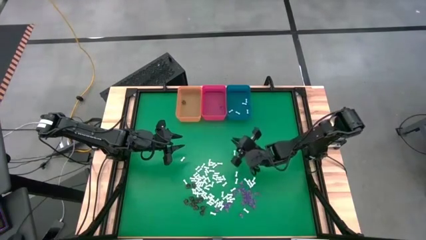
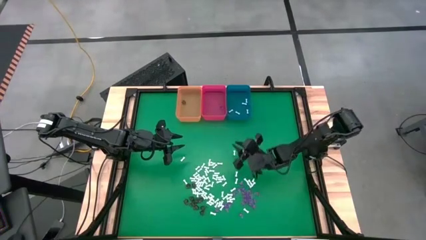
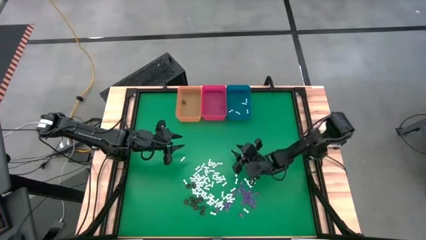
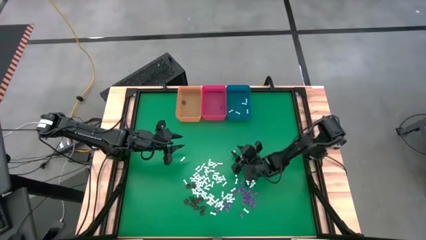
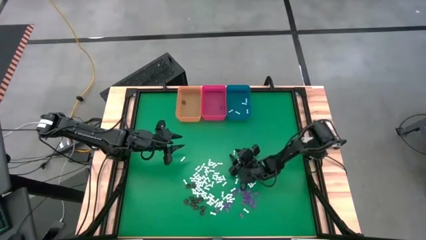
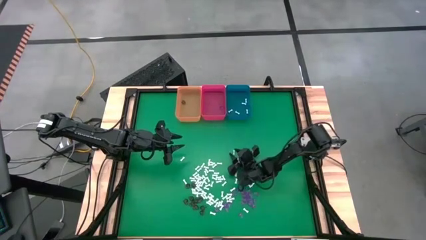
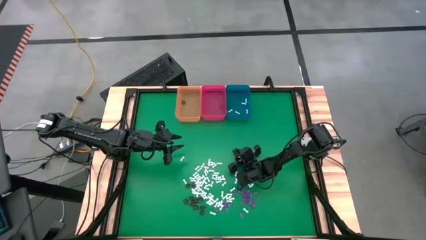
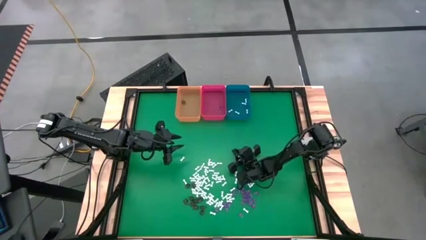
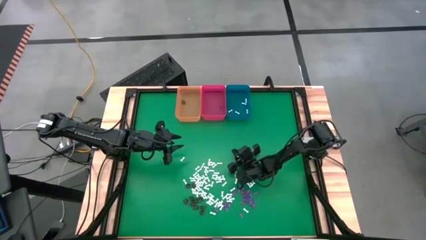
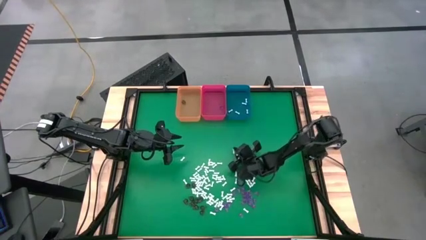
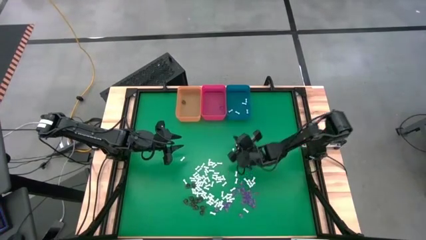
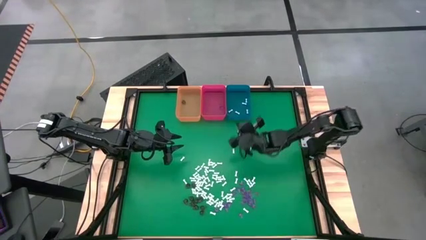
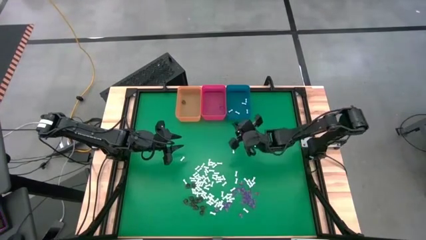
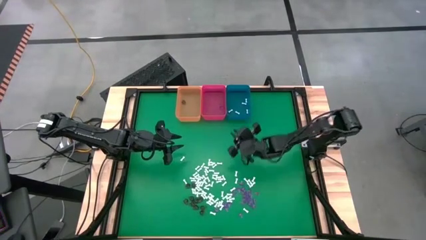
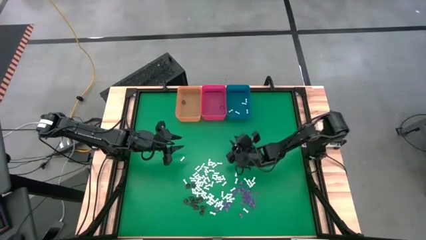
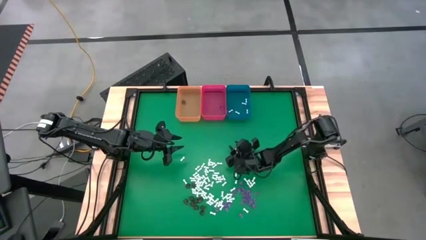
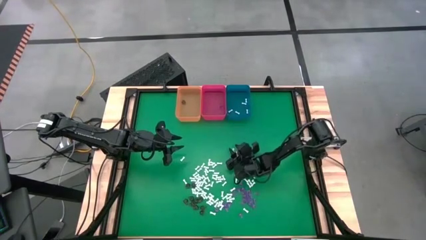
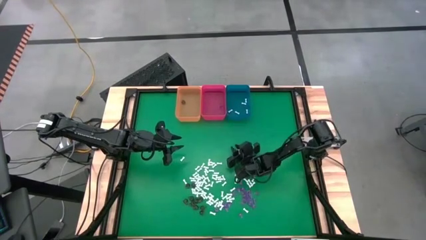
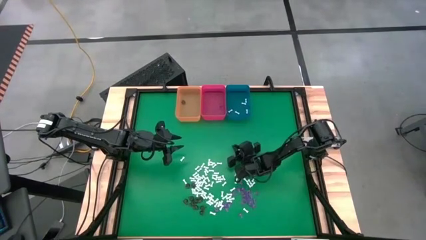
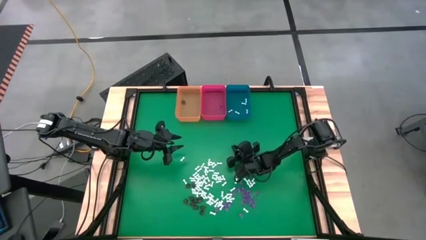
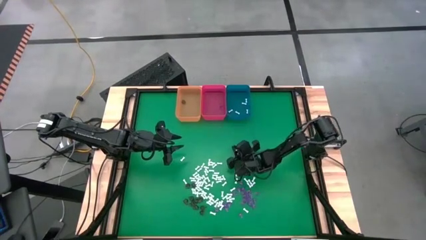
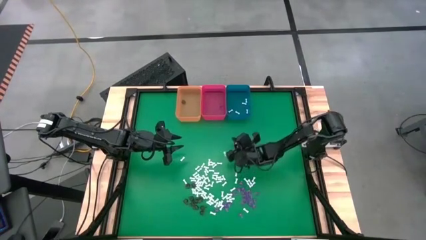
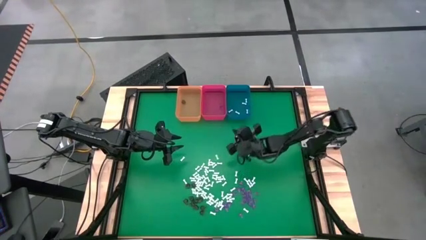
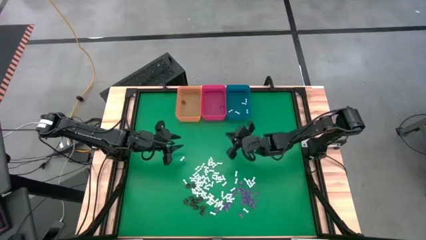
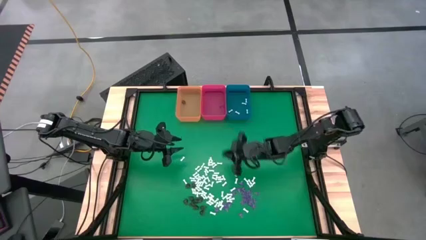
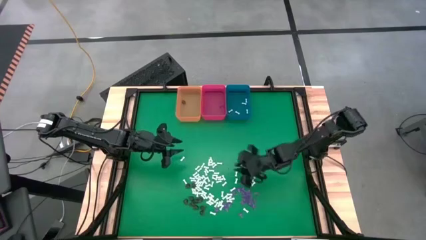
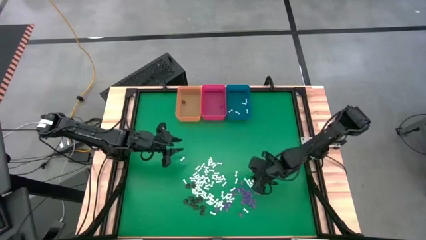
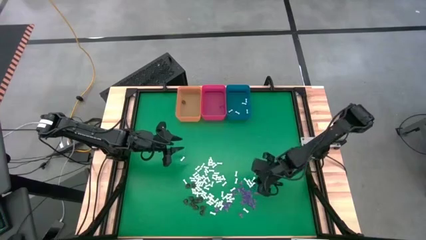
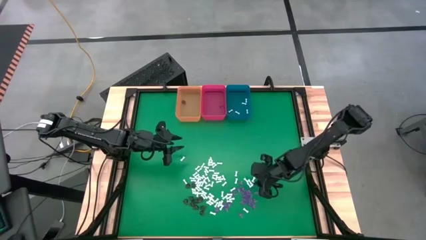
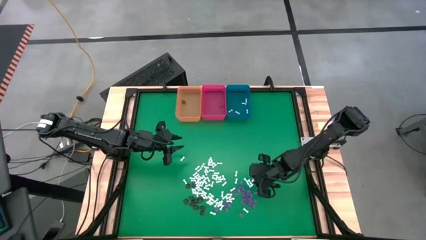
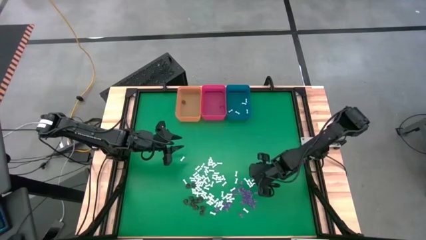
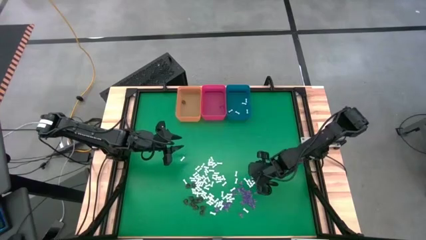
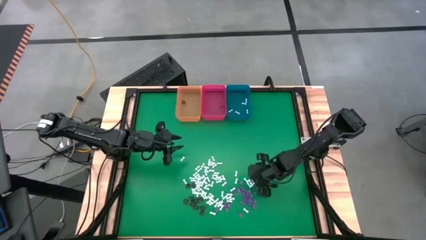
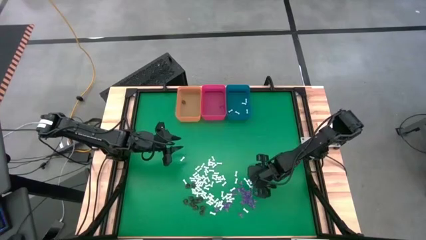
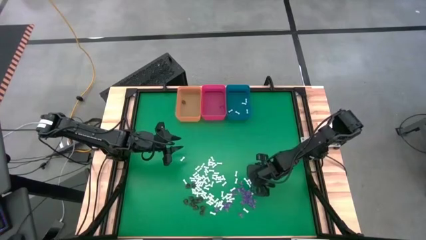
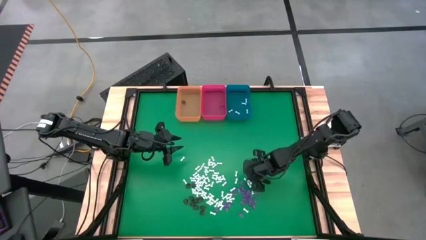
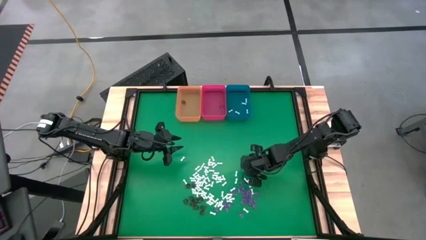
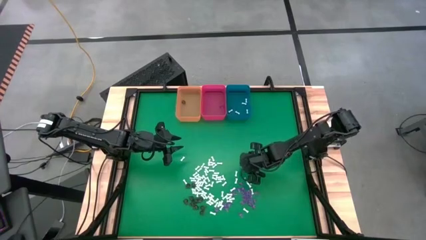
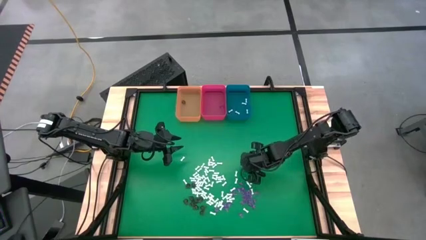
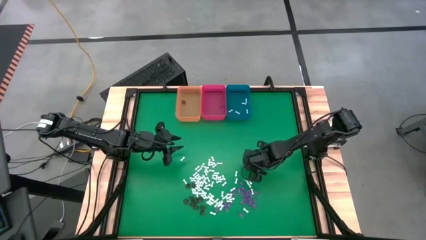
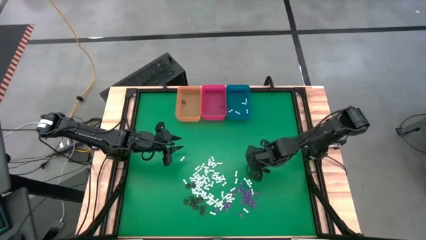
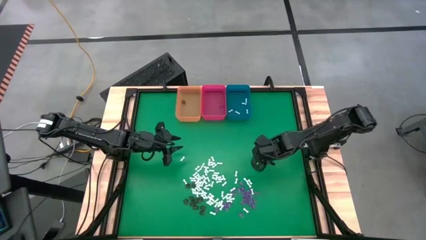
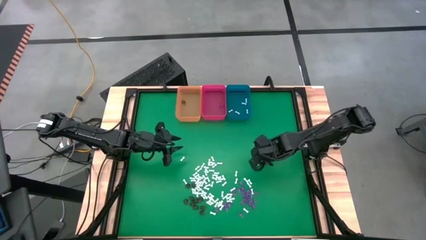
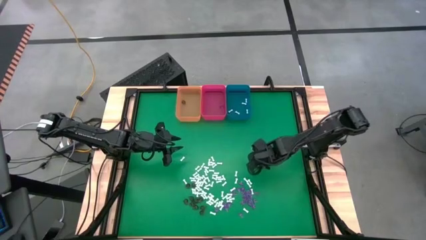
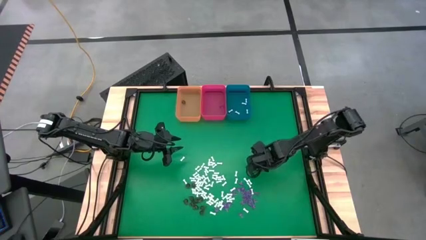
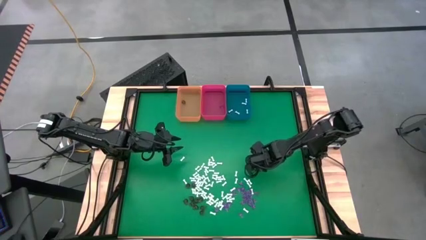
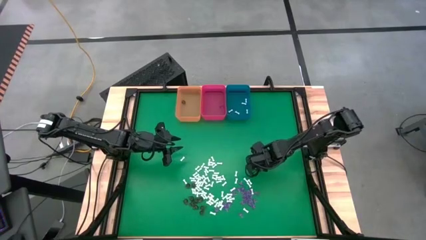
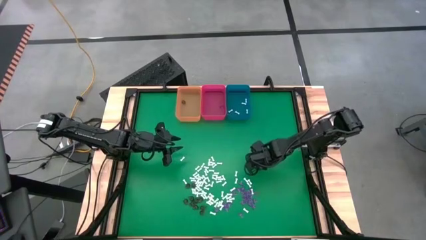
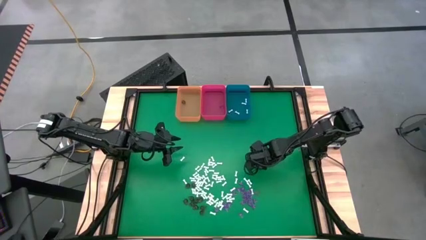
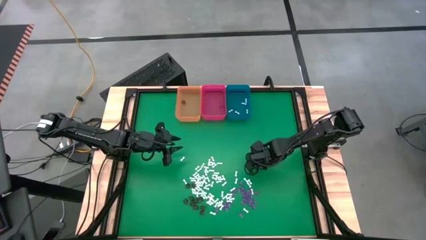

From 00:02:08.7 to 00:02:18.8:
Task: Sort Halloween decoration
Put the white bone toy into the blue bin

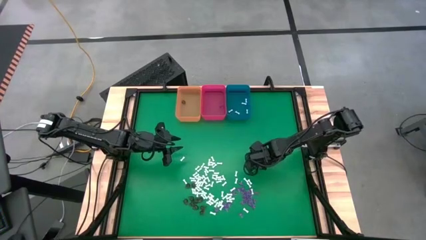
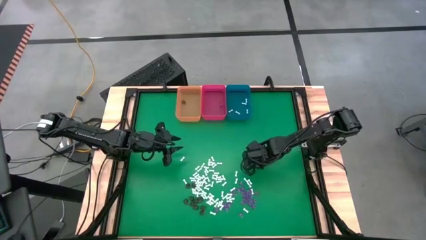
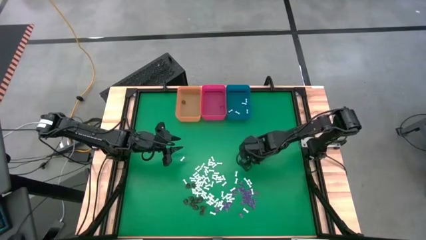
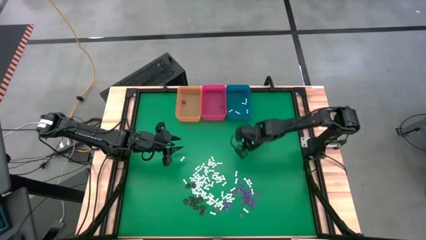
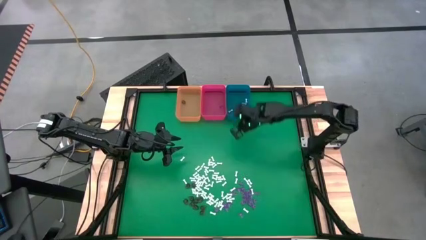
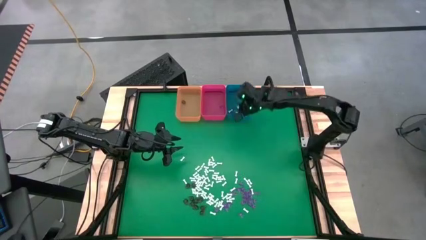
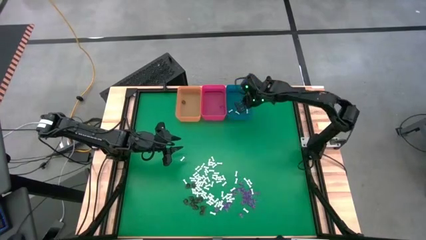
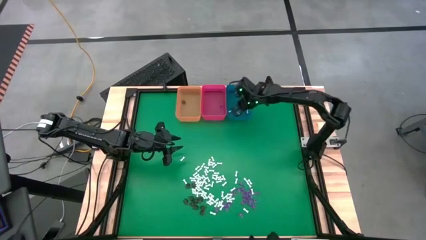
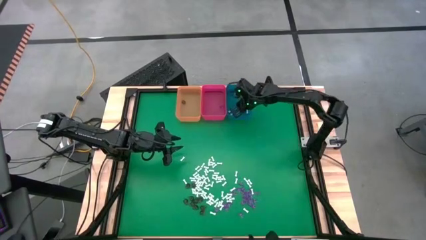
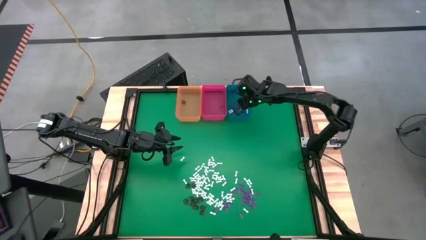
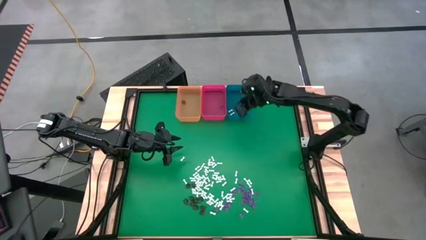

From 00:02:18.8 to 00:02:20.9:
Put the white bone toy into the blue bin

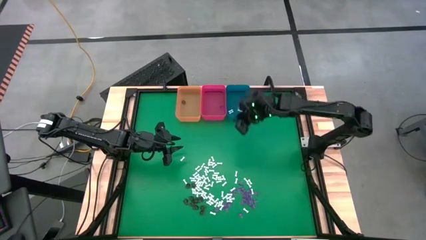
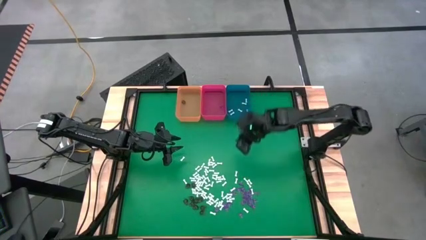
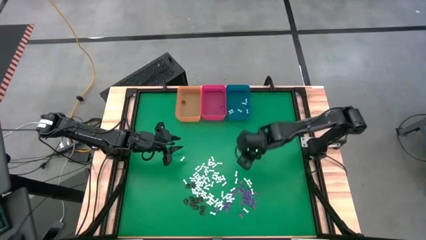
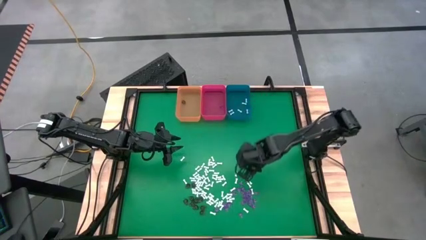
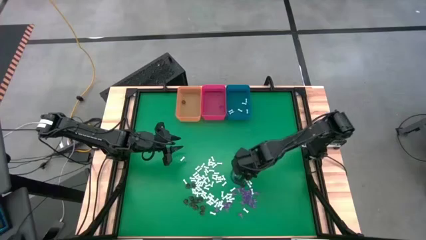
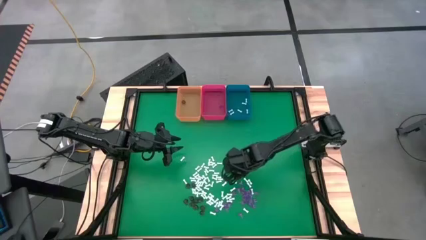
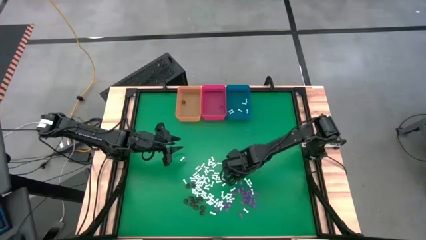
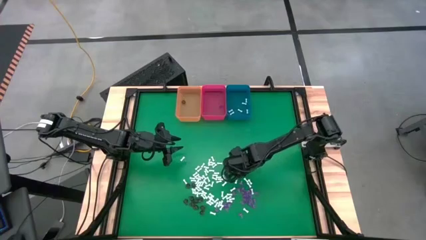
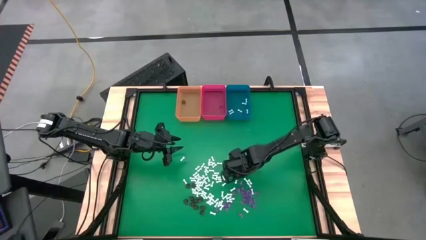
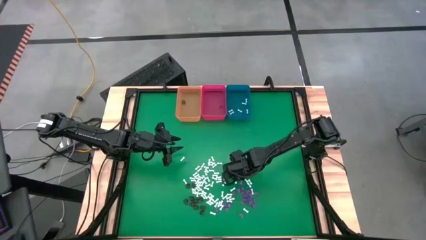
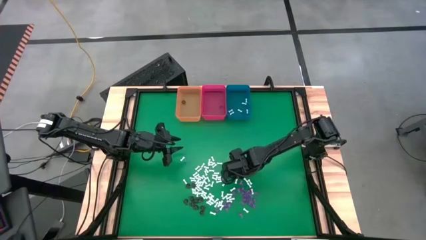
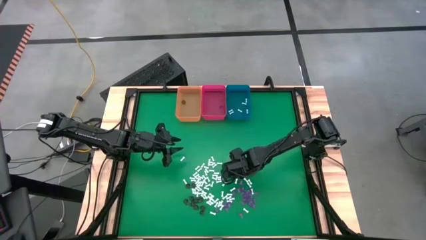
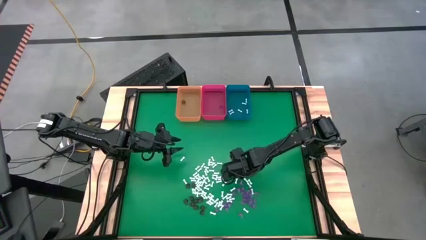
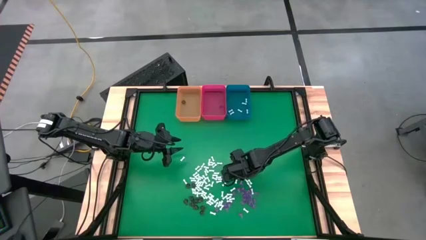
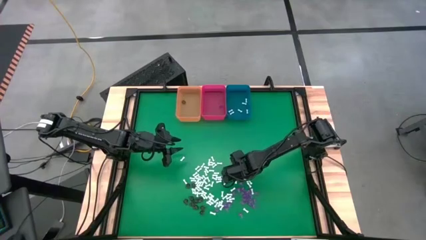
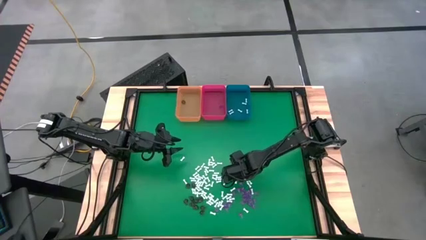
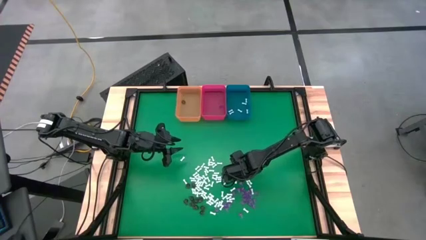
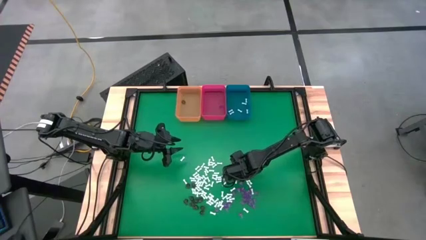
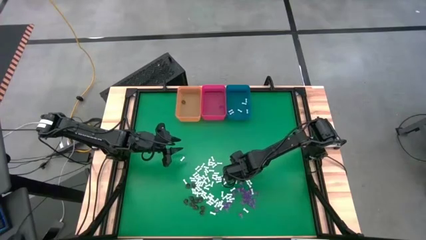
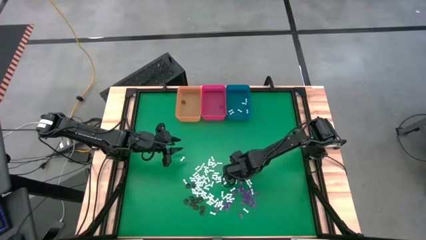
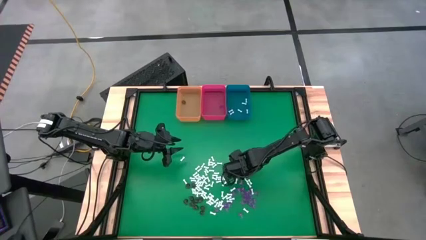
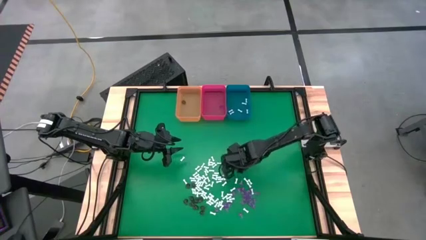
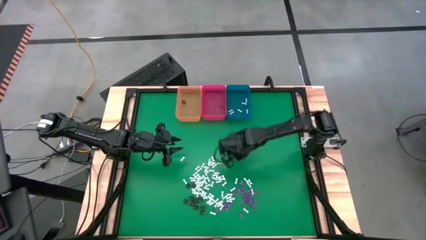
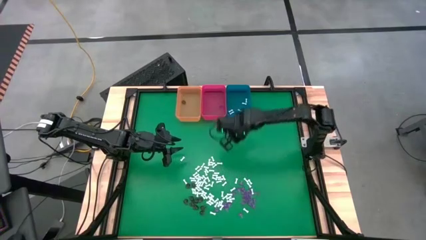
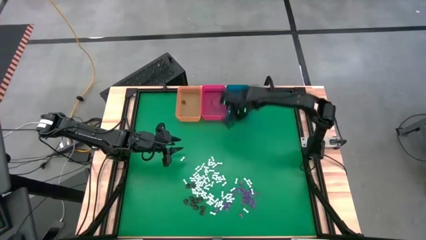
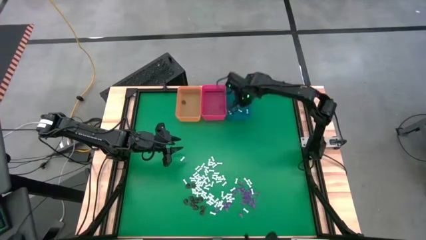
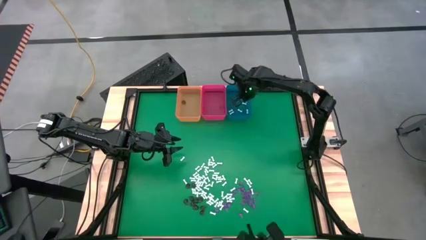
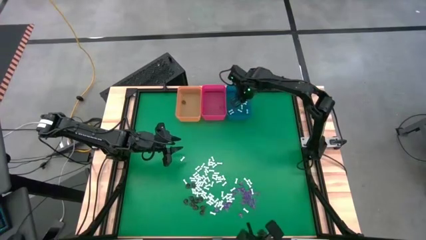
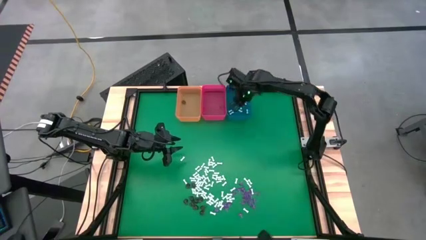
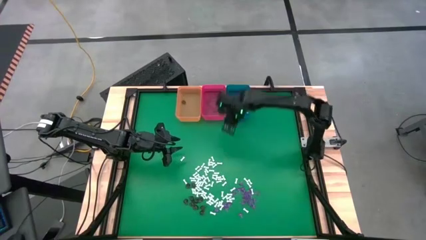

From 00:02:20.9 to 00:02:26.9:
Put the white bone toy into the blue bin
